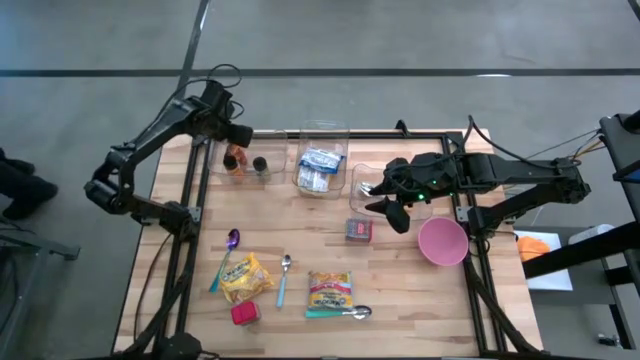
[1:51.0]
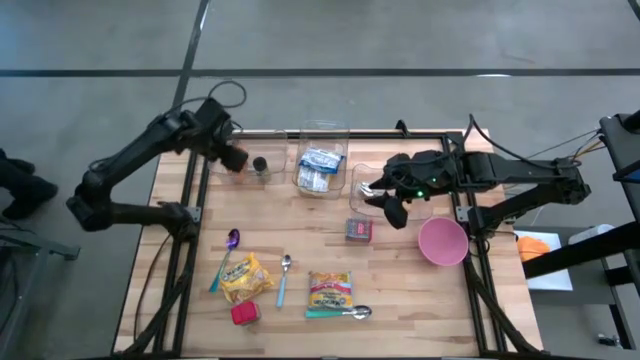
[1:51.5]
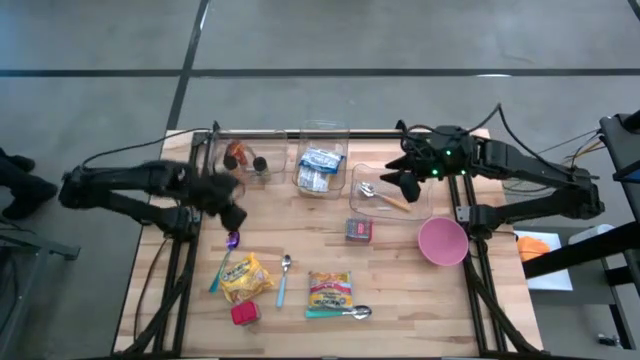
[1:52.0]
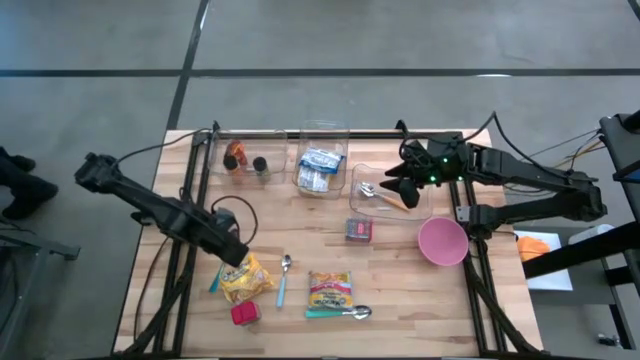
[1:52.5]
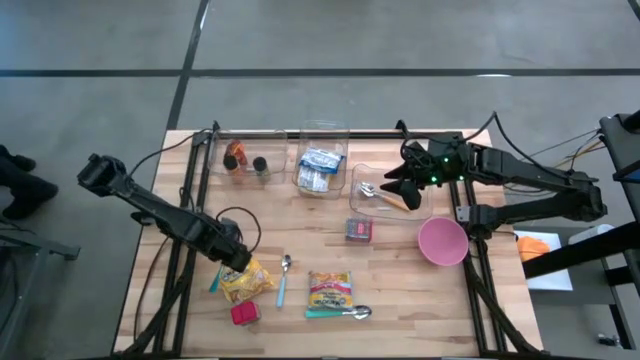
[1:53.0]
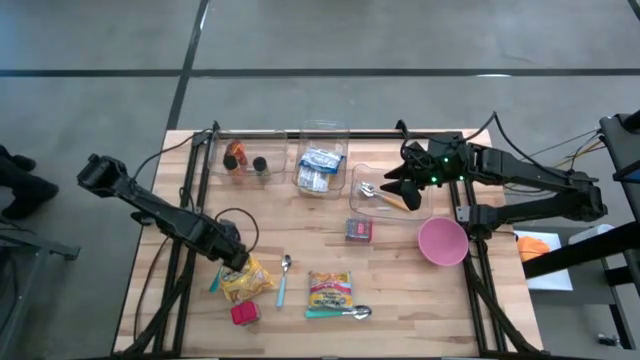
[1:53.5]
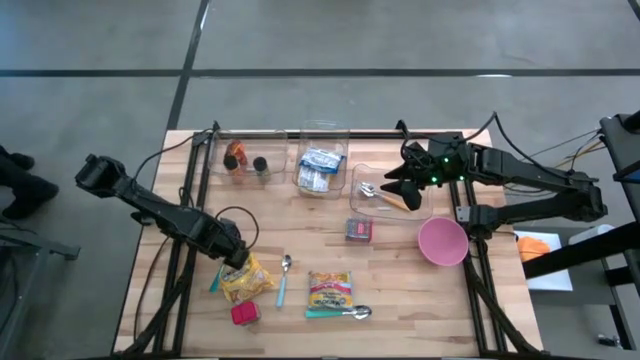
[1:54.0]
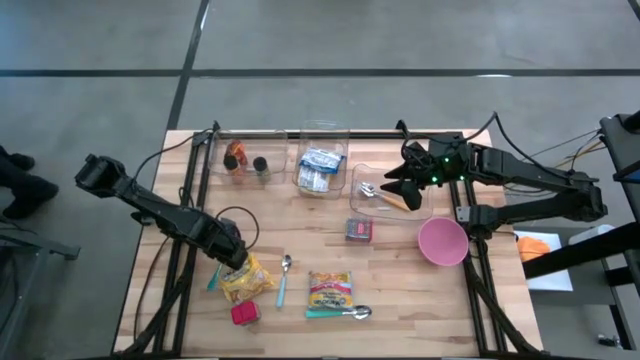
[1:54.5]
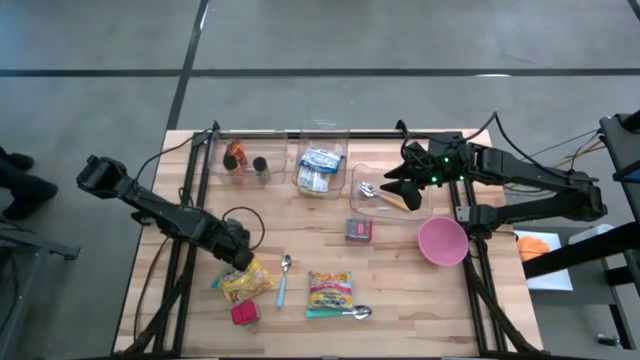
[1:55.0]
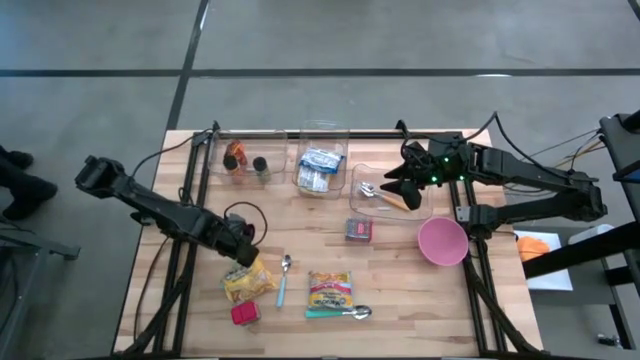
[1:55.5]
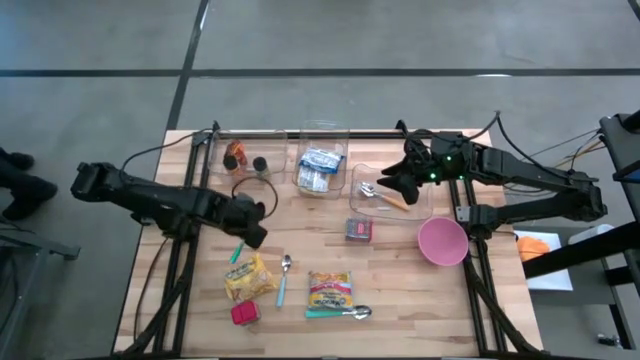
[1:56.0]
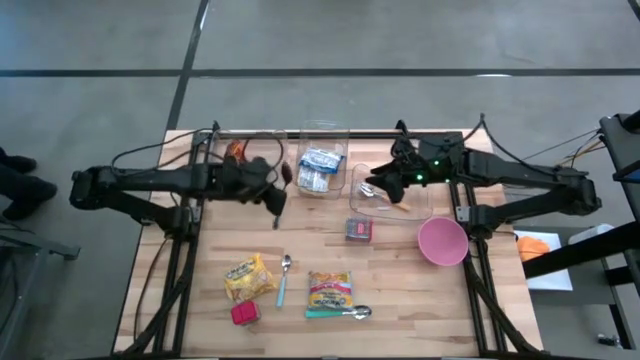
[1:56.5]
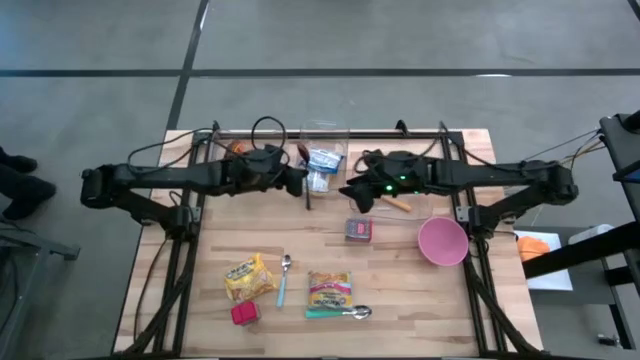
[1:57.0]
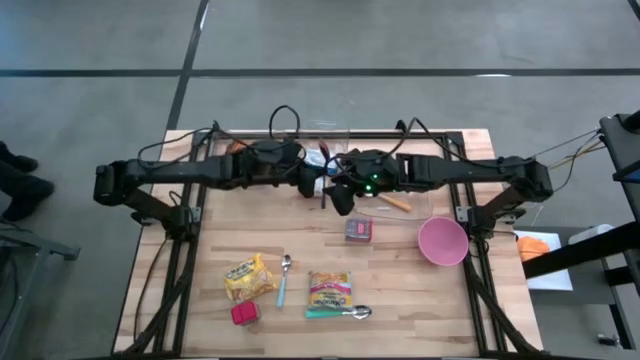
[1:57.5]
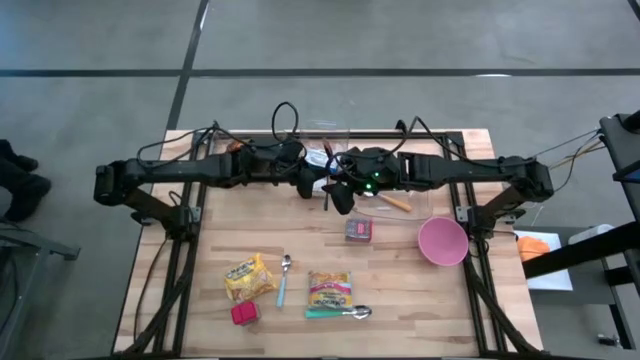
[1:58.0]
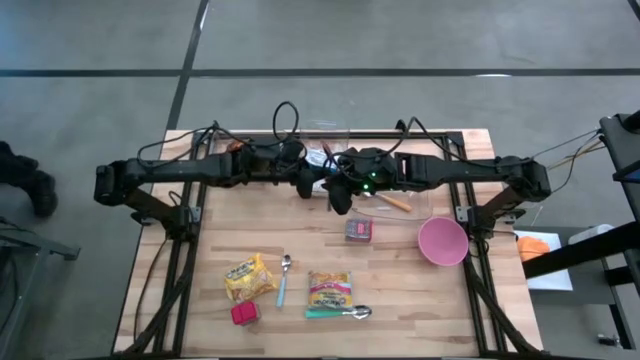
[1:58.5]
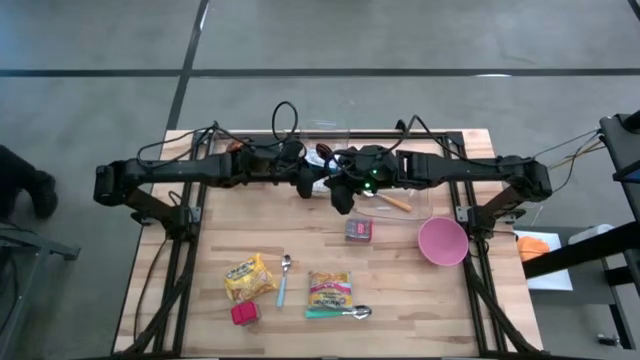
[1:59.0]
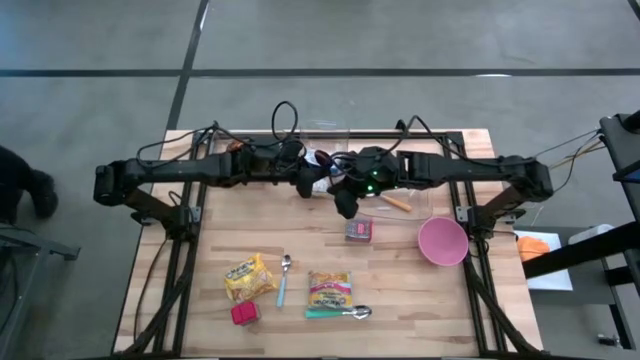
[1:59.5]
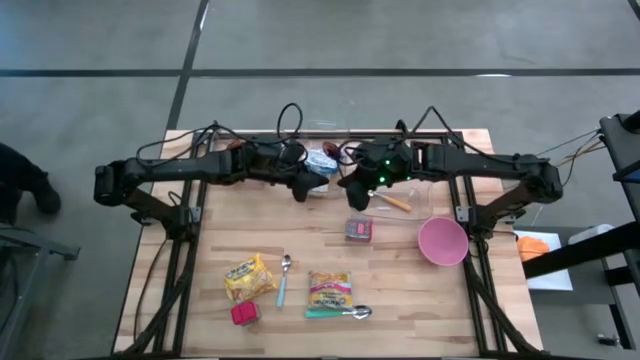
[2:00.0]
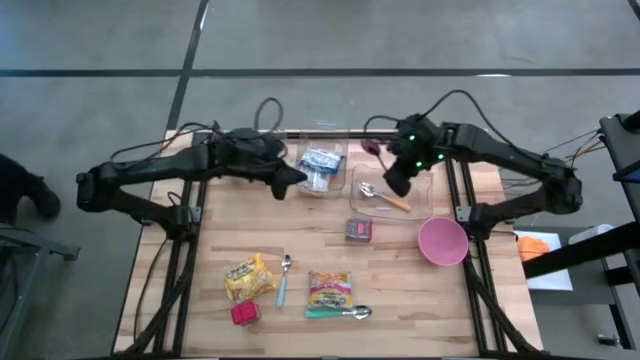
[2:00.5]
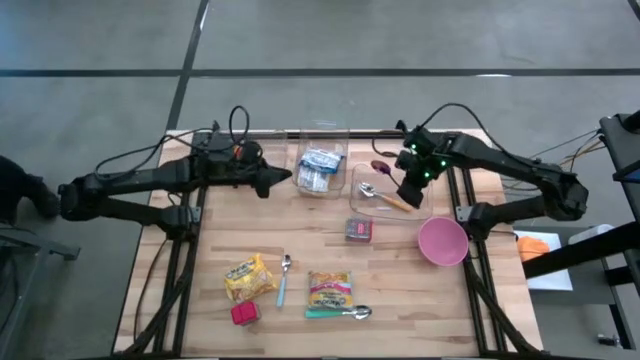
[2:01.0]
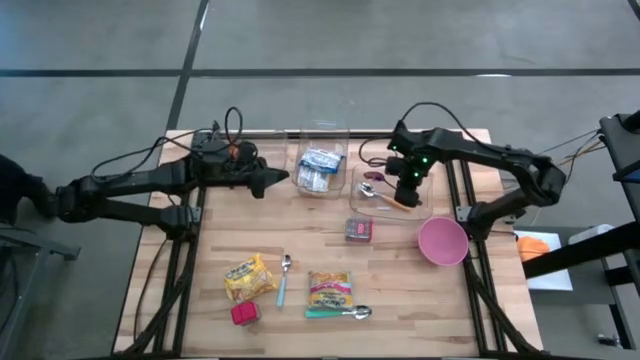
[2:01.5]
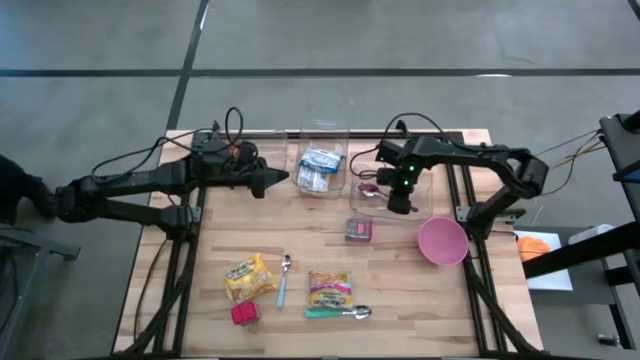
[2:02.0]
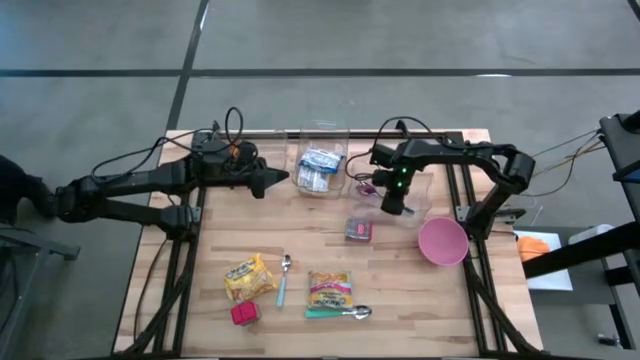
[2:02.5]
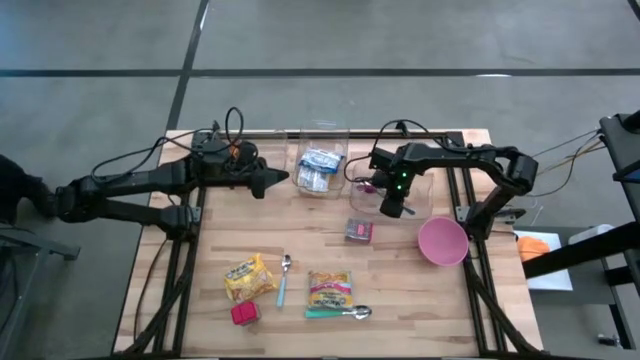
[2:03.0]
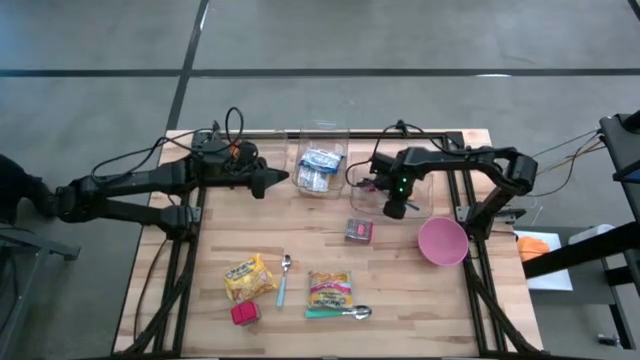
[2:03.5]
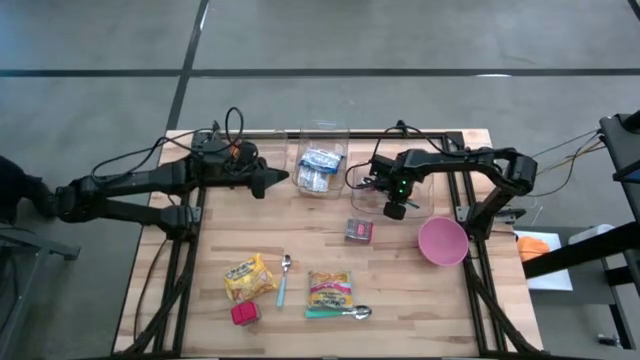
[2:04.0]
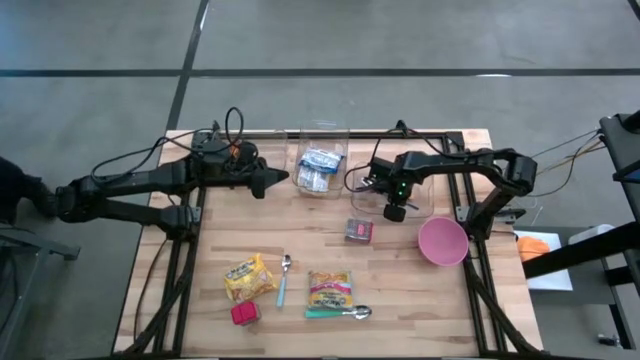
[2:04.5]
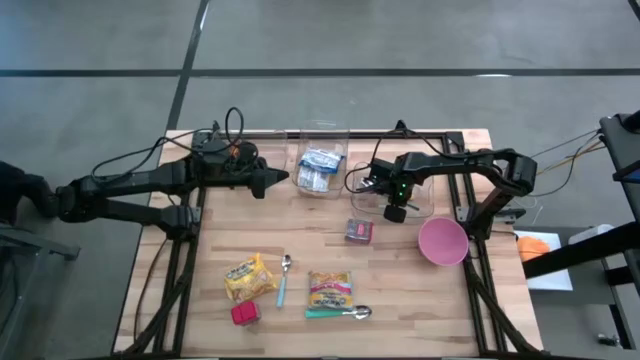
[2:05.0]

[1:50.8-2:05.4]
Put the purple spoon into the right transparent bin

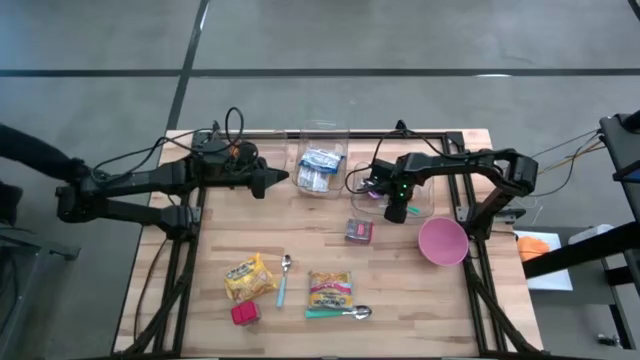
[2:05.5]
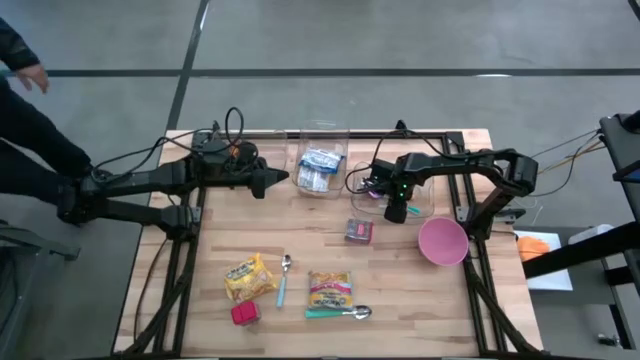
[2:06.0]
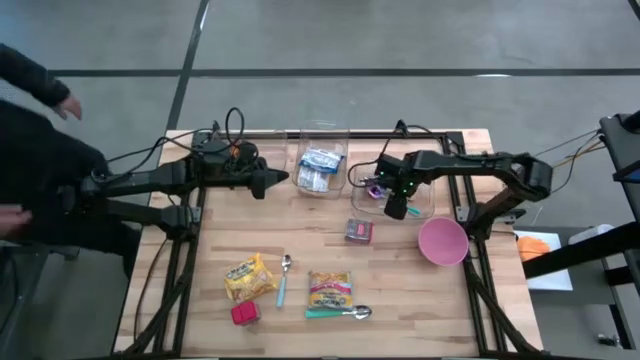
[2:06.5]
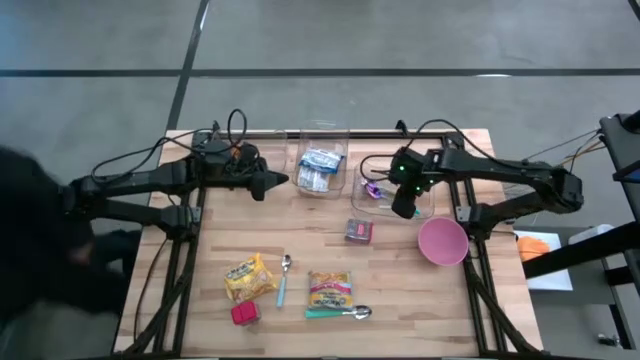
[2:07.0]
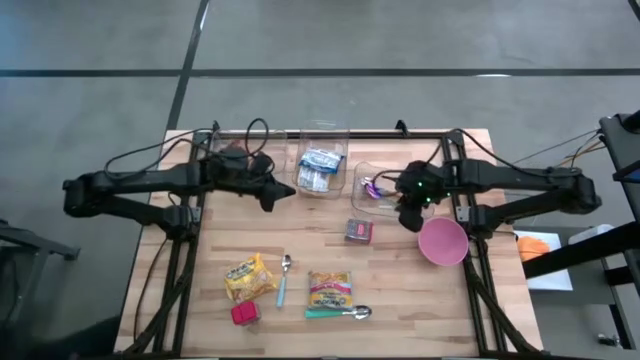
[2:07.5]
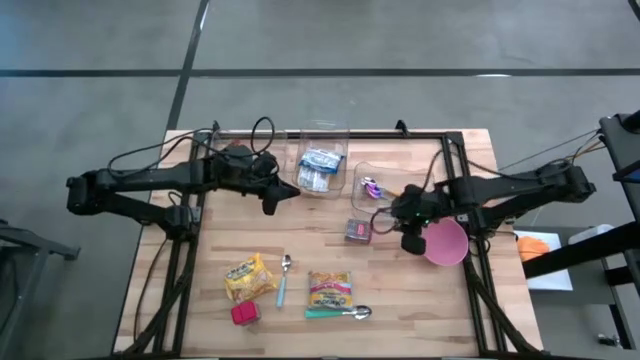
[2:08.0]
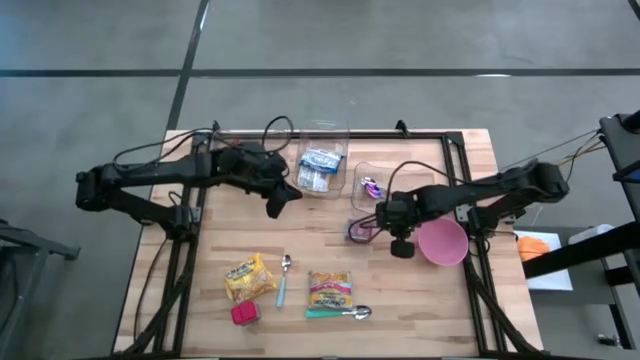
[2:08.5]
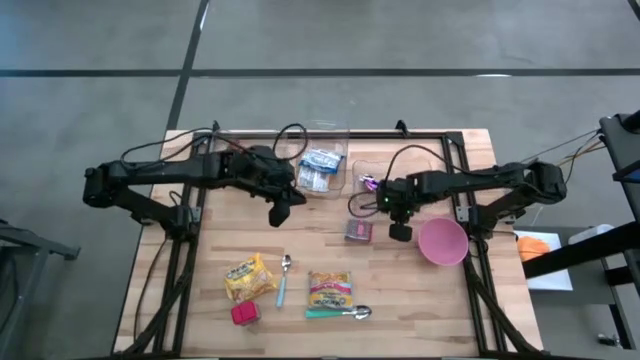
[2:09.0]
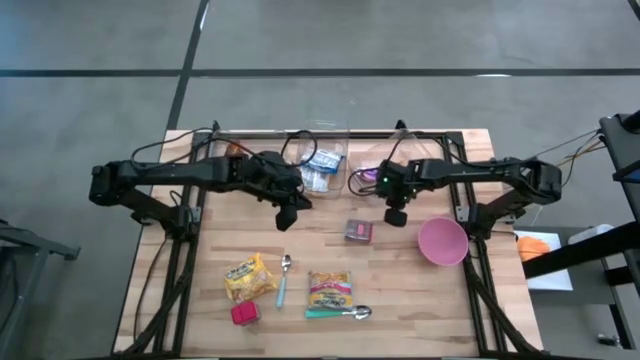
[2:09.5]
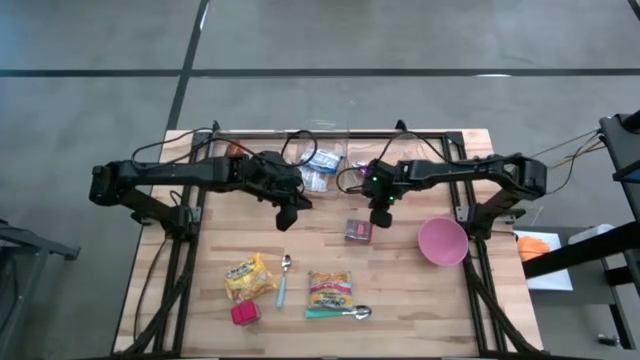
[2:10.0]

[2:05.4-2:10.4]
Adjust the right transparent bin
